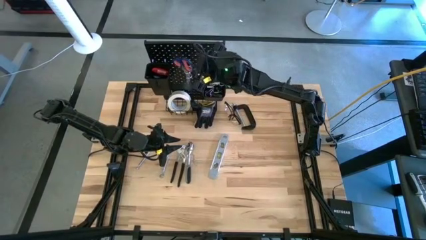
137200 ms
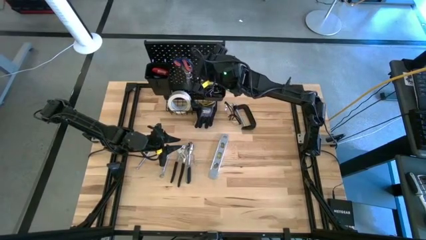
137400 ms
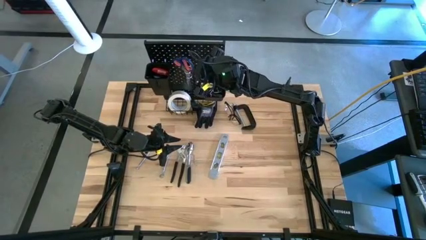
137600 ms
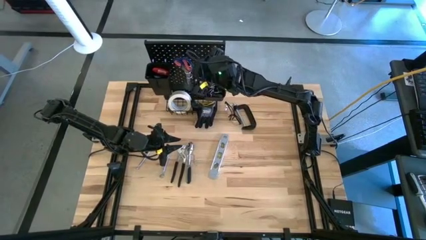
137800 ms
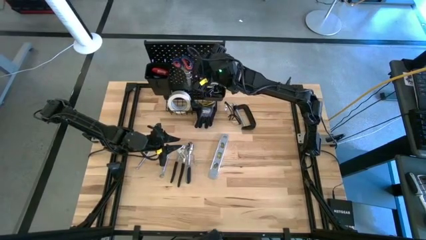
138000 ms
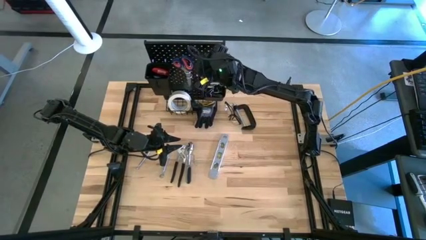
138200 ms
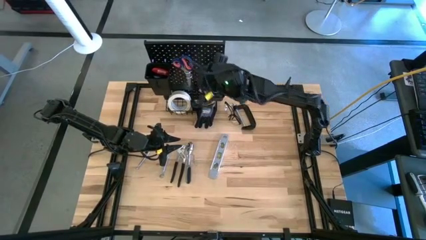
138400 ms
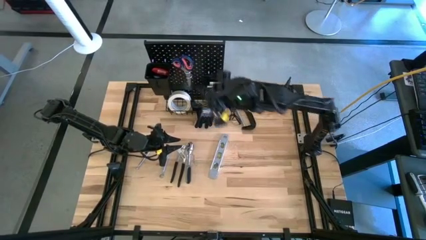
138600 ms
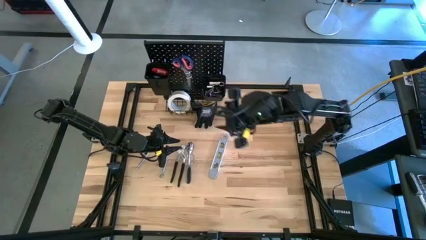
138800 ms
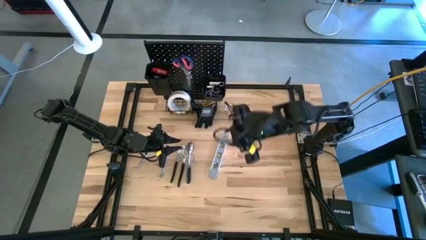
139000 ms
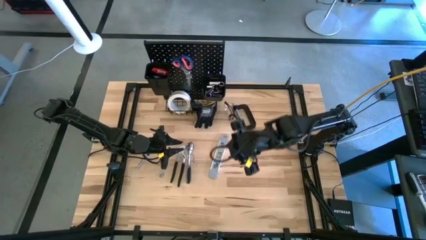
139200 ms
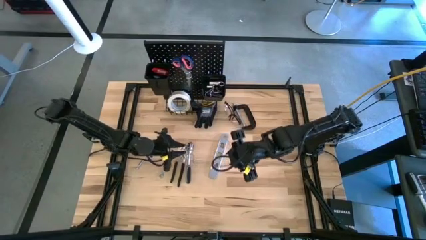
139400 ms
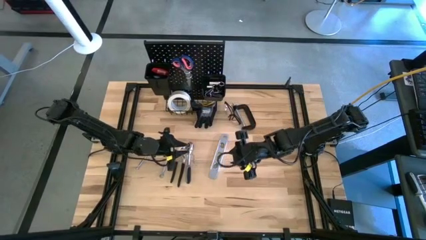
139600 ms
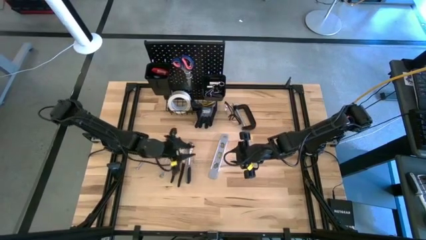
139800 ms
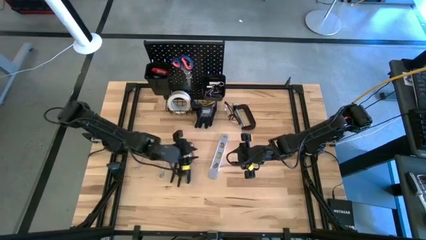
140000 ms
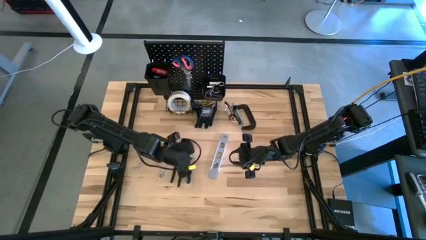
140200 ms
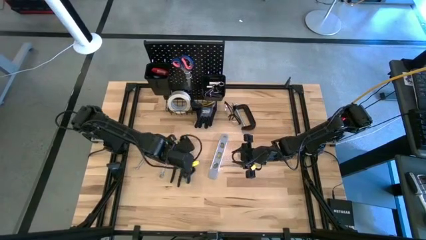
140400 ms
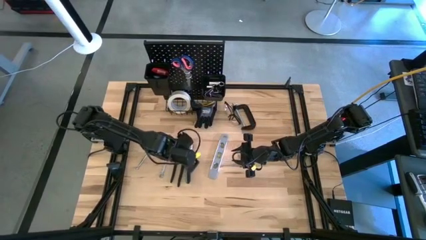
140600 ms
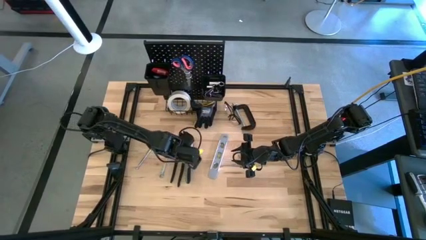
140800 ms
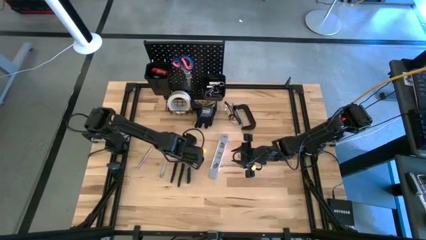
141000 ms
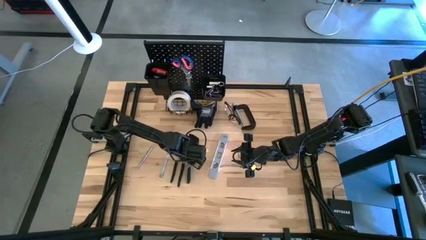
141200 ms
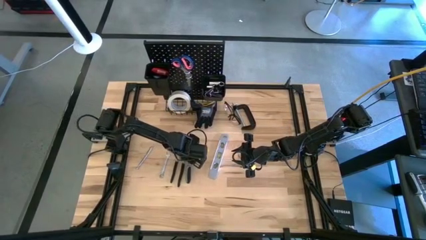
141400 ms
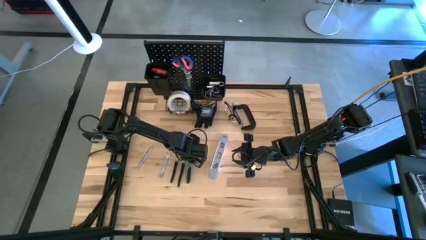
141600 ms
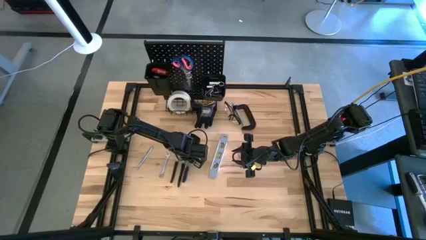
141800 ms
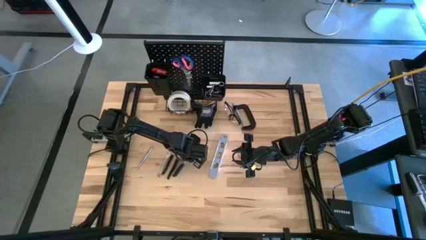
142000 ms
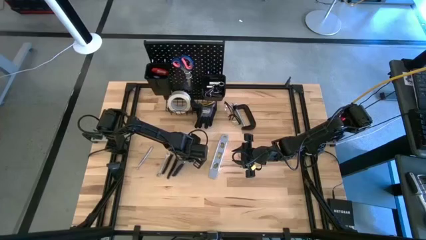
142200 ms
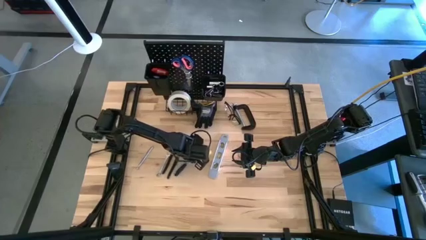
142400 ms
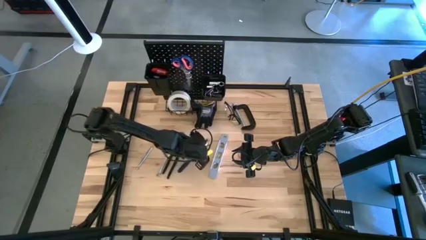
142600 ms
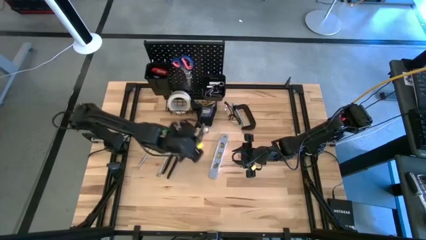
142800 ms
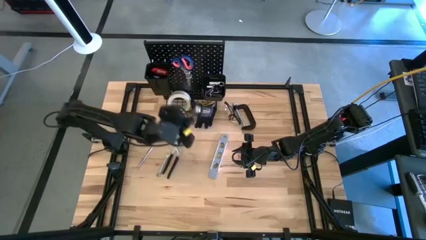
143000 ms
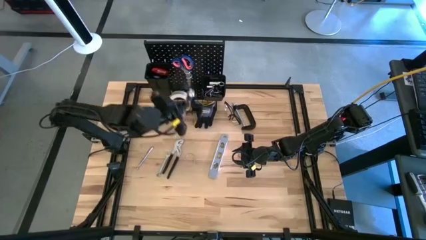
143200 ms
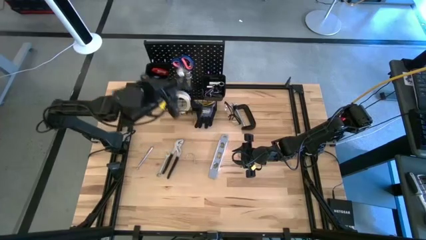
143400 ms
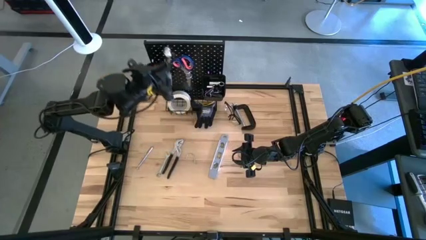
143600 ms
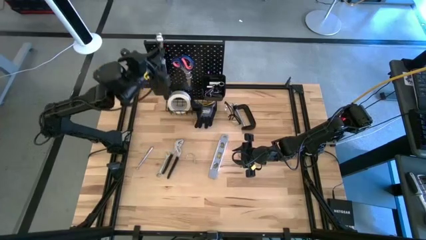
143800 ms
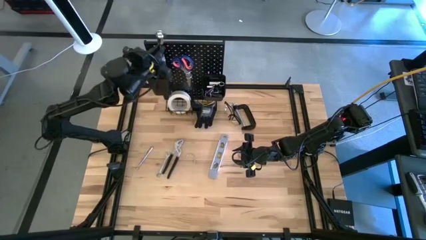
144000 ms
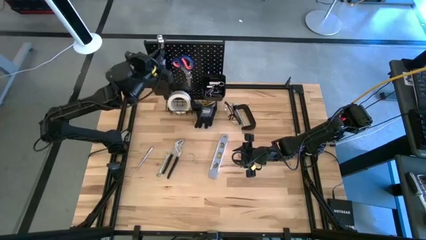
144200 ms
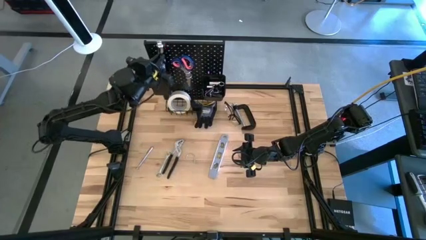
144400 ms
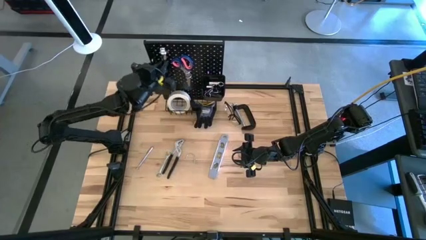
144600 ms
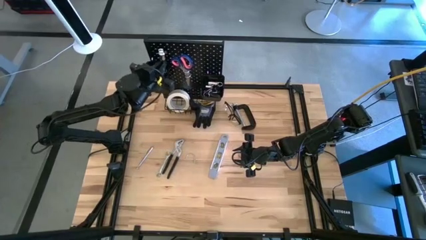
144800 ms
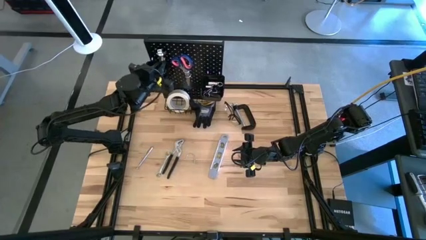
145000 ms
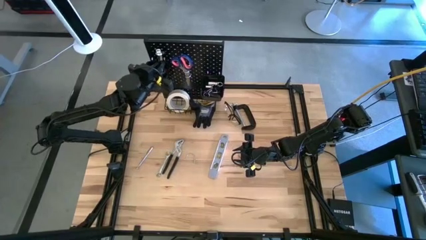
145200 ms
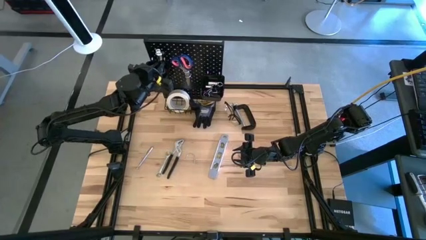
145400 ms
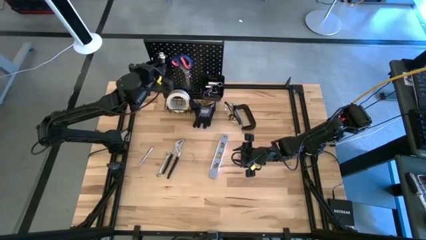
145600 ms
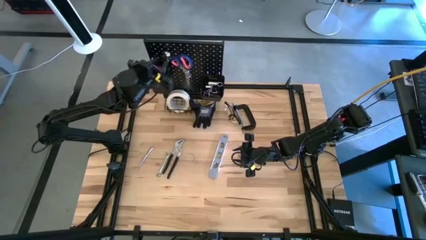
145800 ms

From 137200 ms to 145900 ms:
Task: Hang tools onto peg board
Put the ratchet wrench into the left black bin on the pegboard

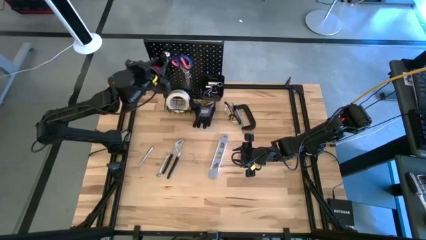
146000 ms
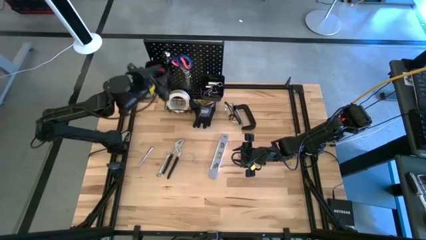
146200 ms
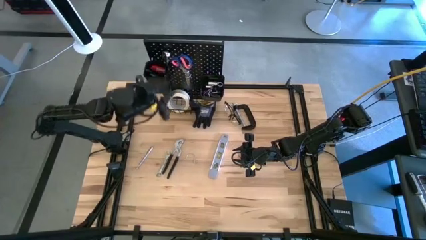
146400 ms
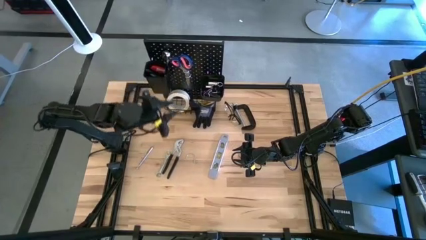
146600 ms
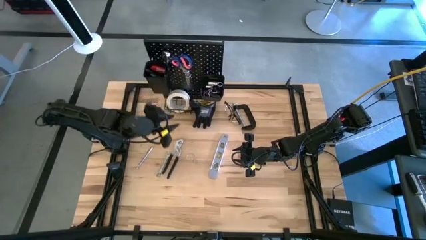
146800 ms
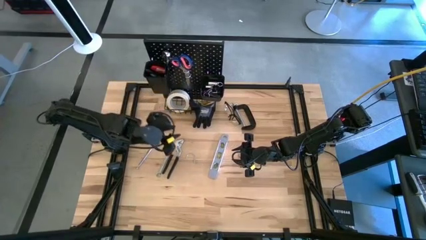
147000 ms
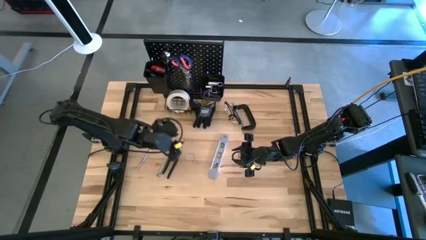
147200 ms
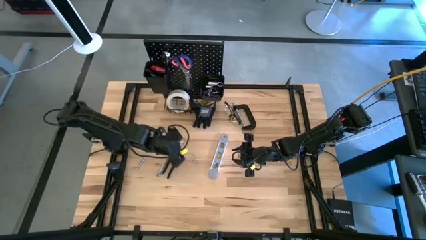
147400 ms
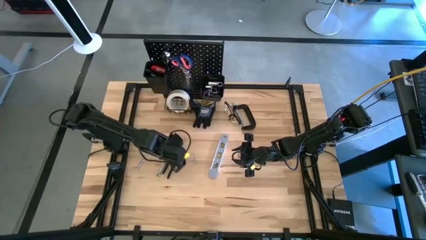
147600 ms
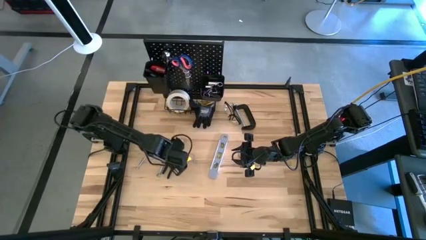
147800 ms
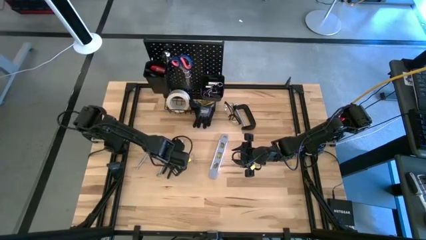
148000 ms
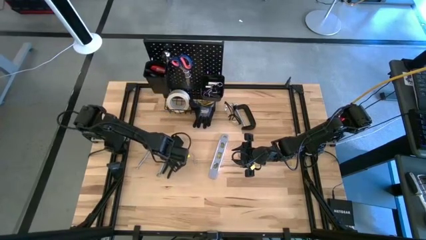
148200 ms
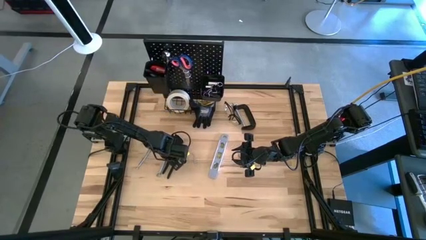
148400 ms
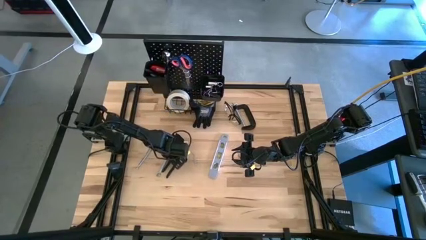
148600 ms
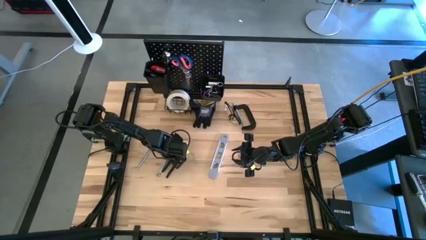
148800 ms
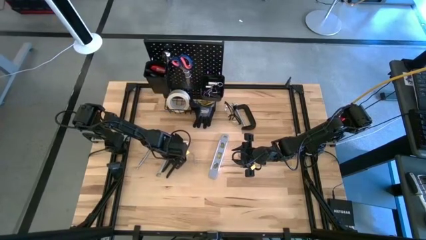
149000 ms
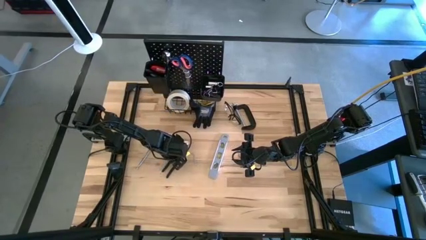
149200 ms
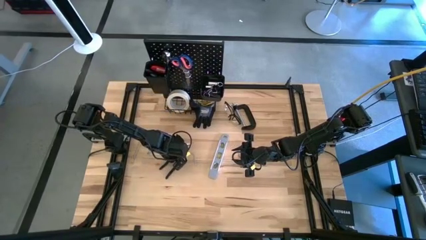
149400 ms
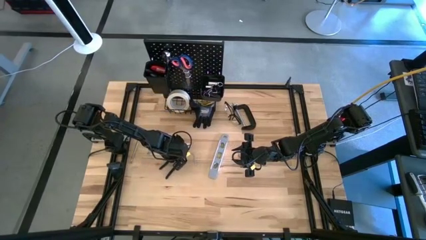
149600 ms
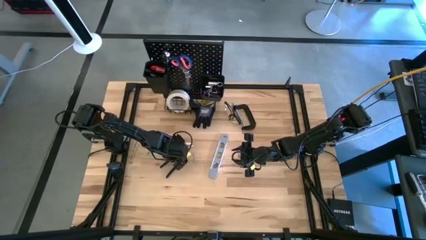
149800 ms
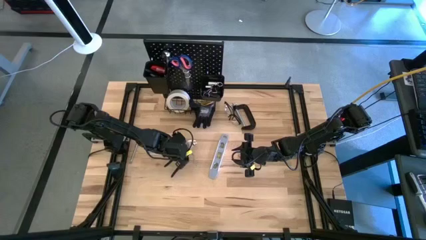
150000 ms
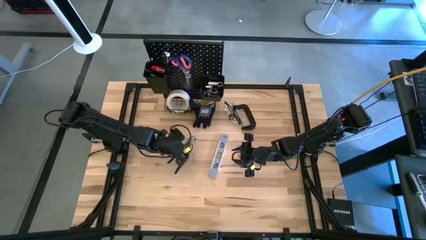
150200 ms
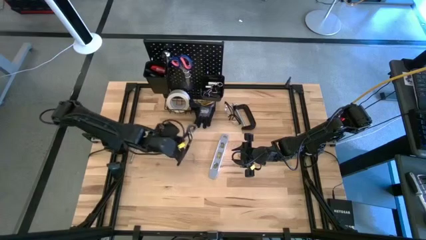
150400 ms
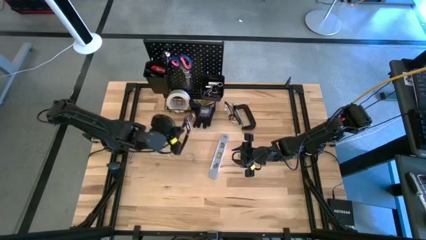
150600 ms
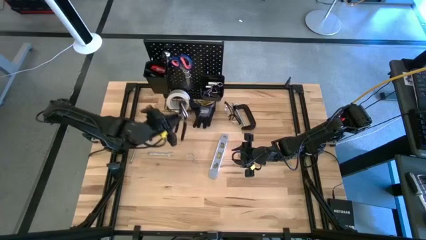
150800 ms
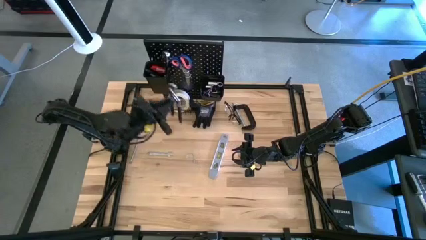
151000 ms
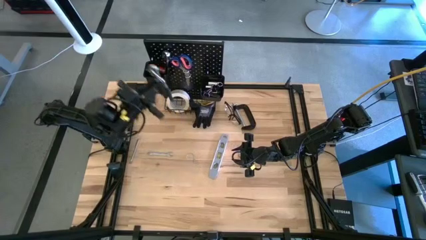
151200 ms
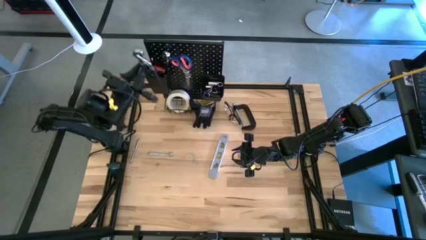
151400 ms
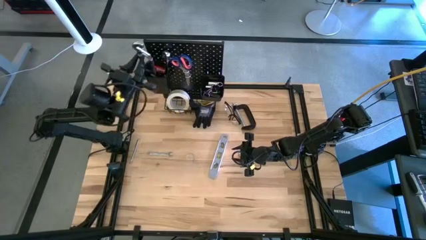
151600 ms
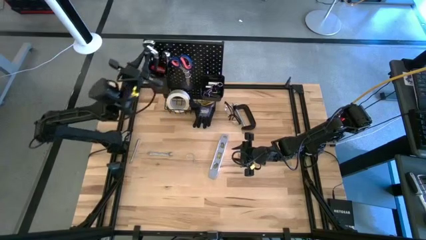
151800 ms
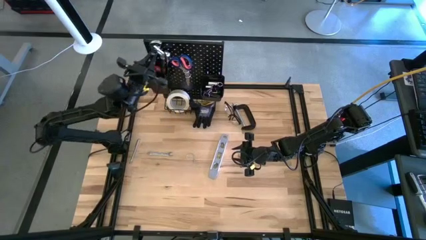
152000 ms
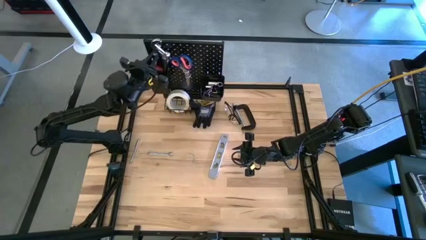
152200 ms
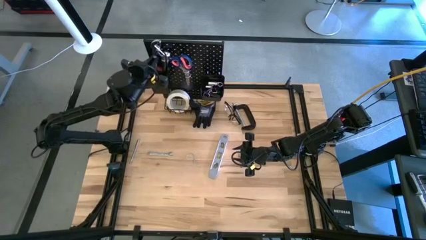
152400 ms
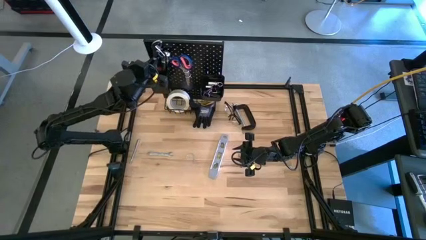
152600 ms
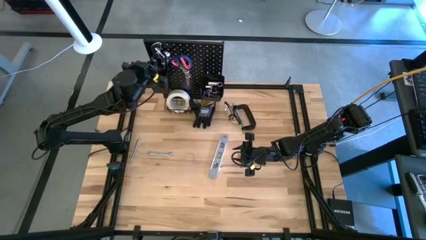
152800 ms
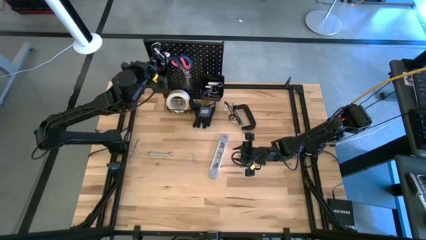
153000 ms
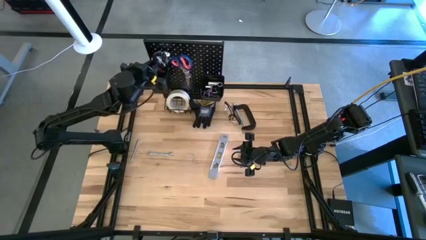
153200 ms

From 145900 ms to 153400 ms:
Put the slip joint pliers into the left black bin on the pegboard

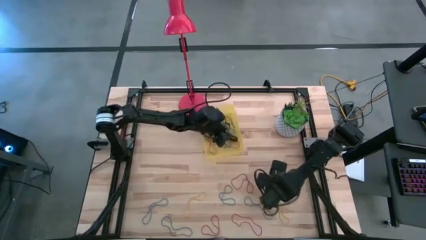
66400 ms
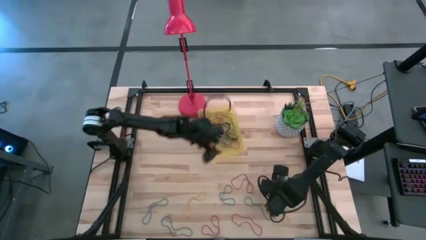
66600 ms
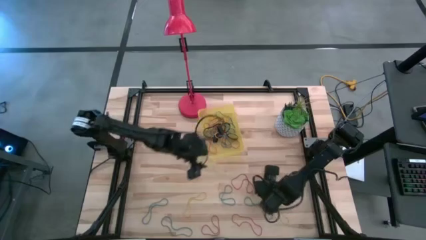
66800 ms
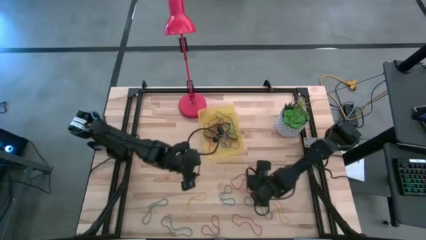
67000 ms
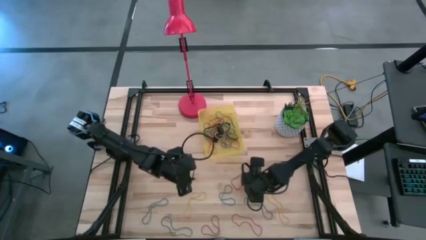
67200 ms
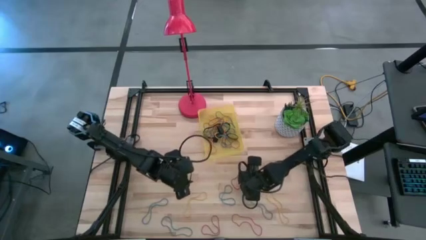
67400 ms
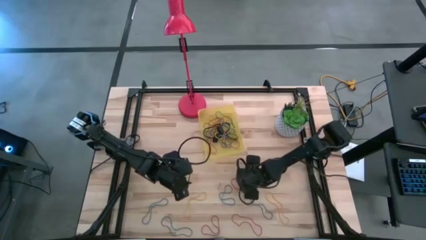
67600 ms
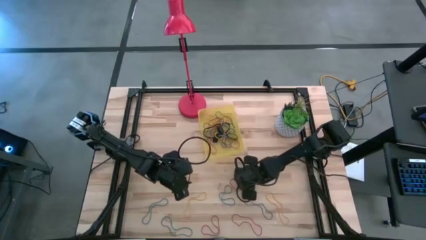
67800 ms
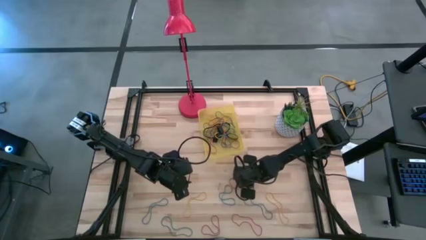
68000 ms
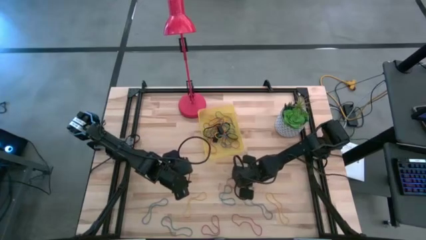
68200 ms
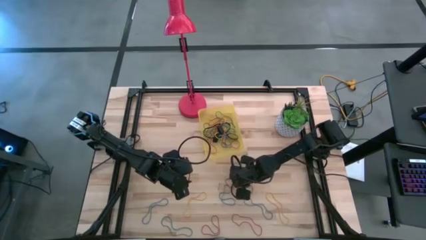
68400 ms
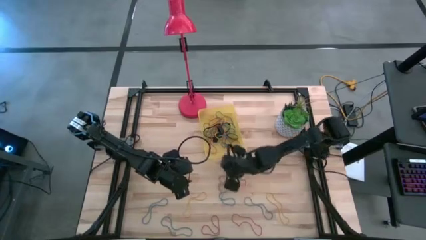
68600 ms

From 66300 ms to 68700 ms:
Task: Pick and place rubber bands into bin
Put the red rubber band into the yellow bin
